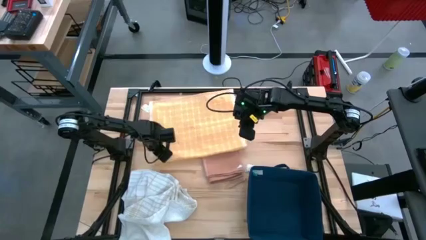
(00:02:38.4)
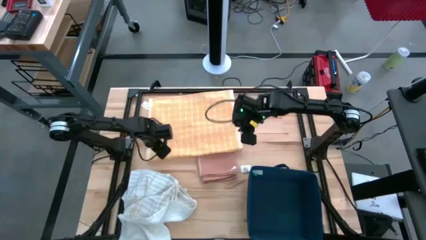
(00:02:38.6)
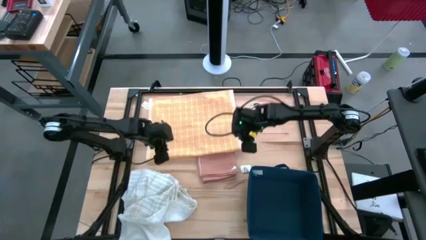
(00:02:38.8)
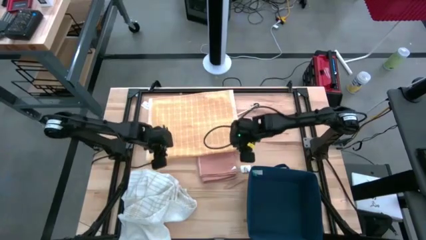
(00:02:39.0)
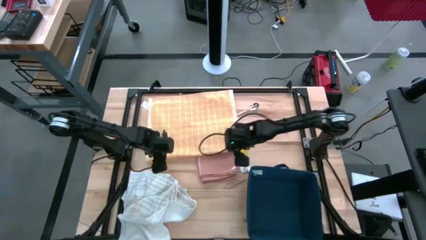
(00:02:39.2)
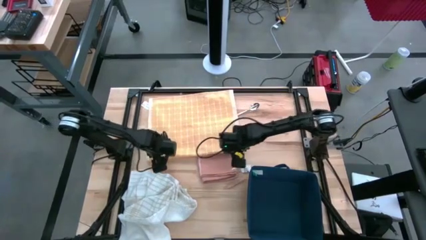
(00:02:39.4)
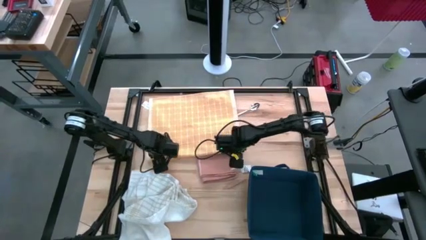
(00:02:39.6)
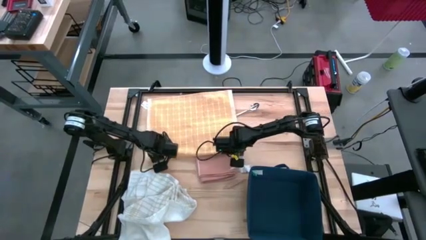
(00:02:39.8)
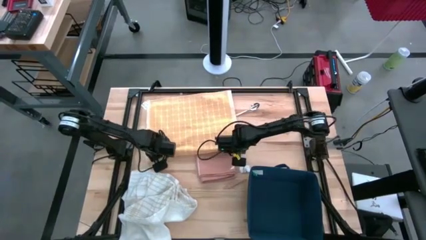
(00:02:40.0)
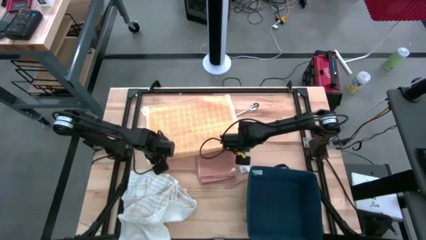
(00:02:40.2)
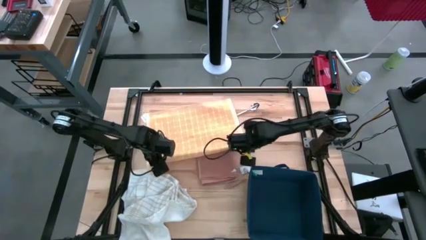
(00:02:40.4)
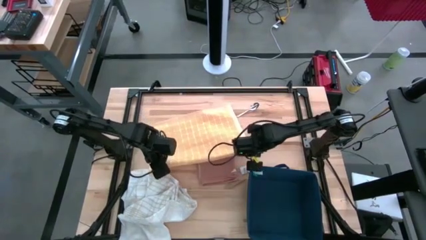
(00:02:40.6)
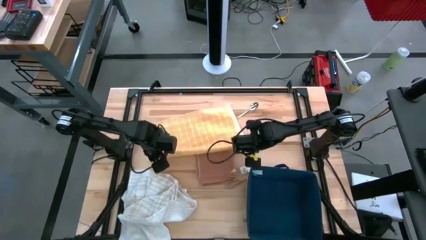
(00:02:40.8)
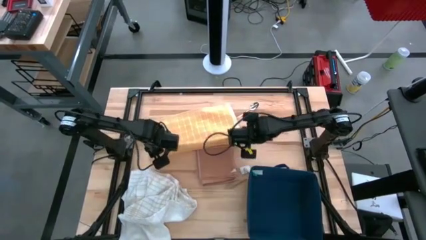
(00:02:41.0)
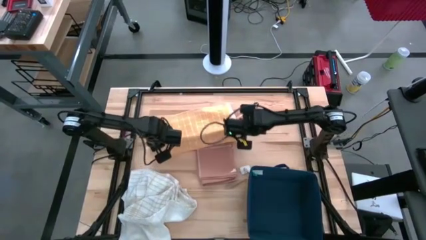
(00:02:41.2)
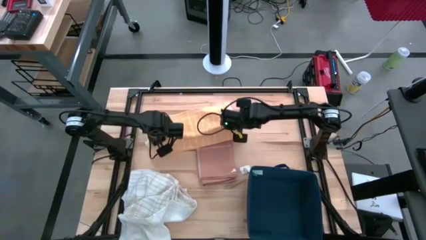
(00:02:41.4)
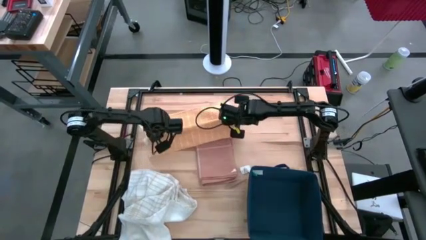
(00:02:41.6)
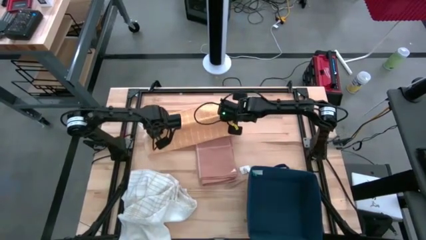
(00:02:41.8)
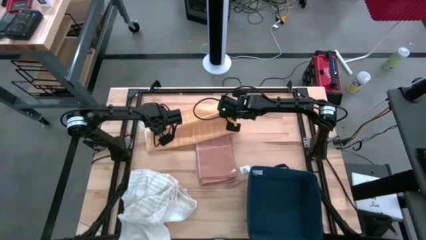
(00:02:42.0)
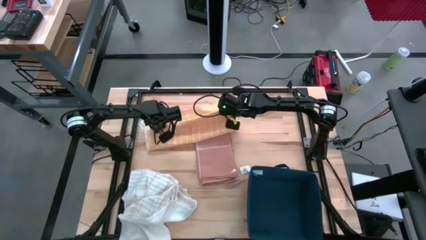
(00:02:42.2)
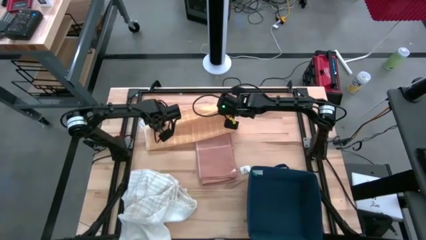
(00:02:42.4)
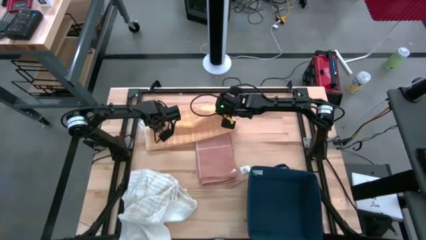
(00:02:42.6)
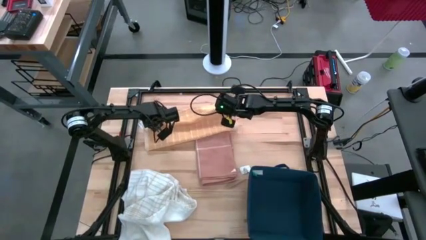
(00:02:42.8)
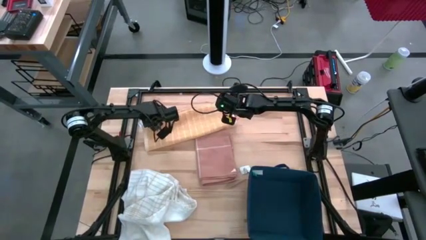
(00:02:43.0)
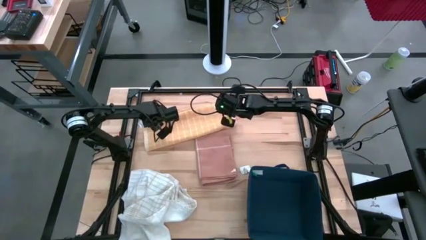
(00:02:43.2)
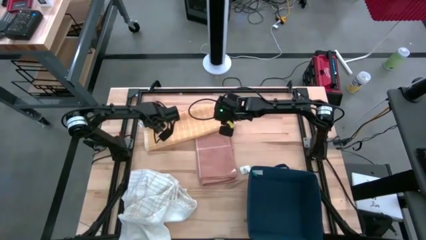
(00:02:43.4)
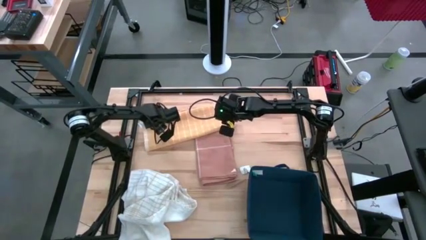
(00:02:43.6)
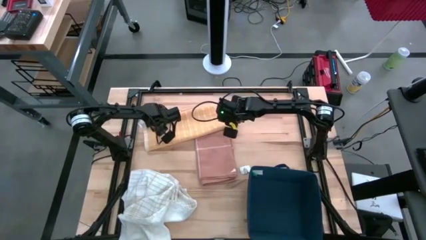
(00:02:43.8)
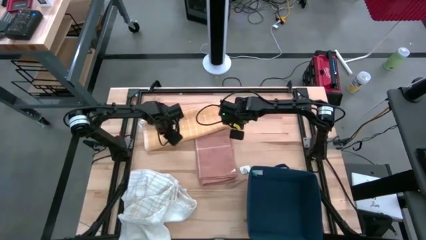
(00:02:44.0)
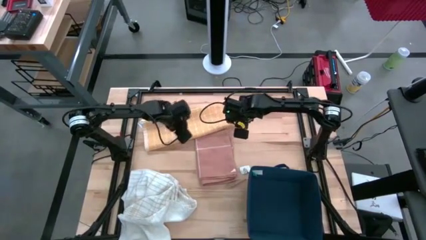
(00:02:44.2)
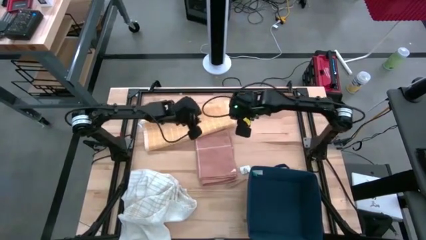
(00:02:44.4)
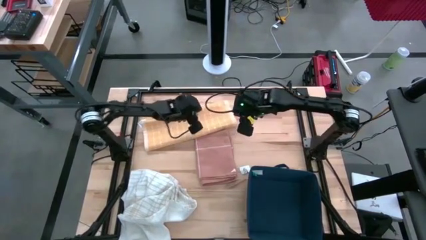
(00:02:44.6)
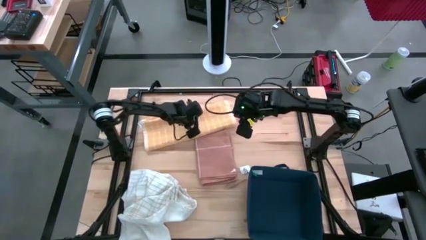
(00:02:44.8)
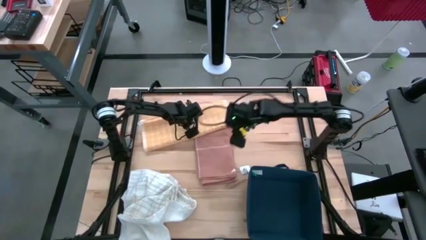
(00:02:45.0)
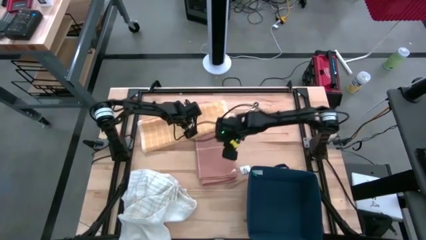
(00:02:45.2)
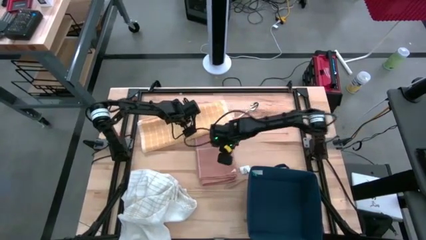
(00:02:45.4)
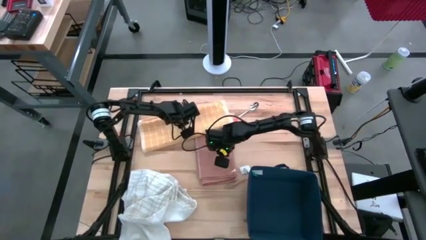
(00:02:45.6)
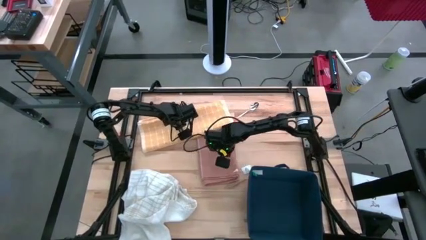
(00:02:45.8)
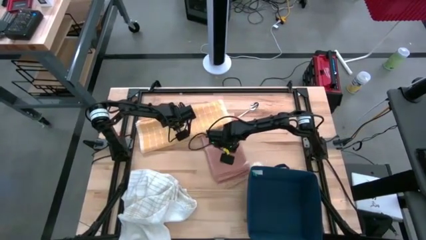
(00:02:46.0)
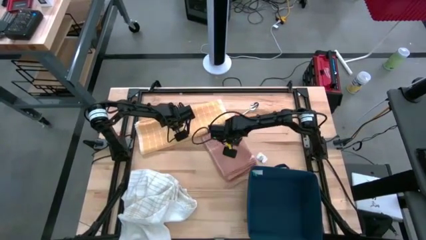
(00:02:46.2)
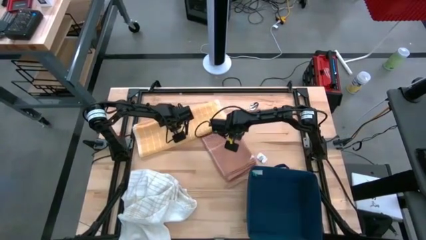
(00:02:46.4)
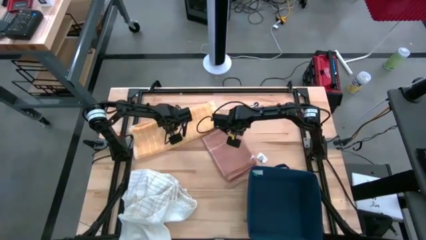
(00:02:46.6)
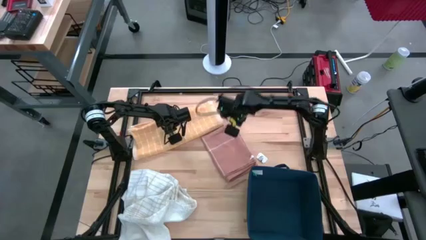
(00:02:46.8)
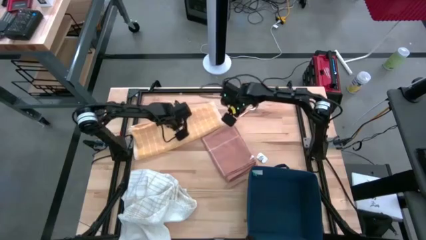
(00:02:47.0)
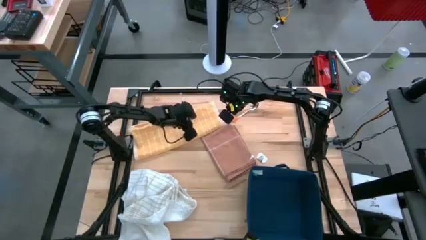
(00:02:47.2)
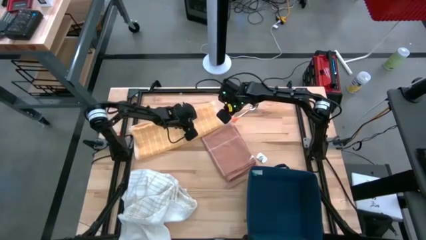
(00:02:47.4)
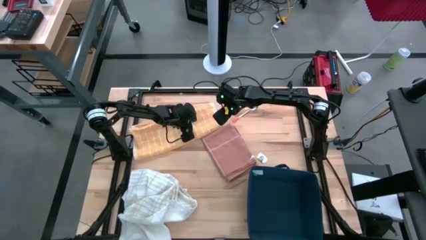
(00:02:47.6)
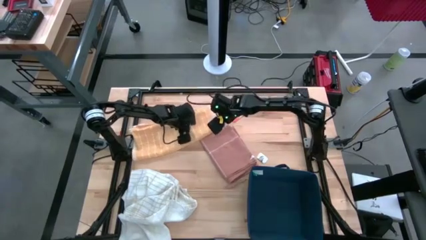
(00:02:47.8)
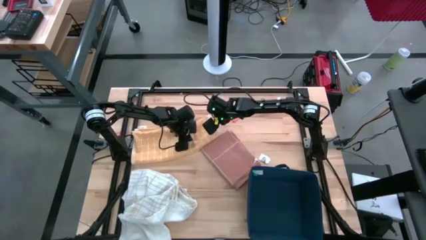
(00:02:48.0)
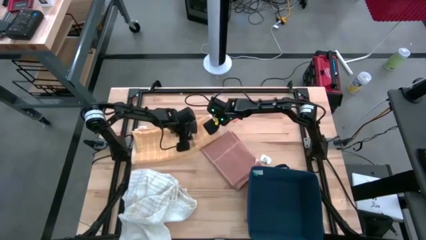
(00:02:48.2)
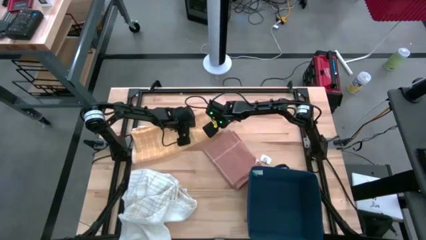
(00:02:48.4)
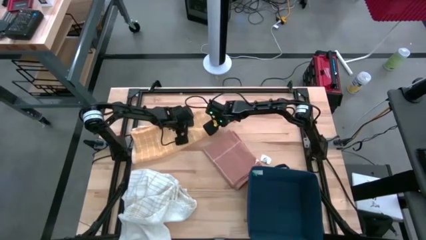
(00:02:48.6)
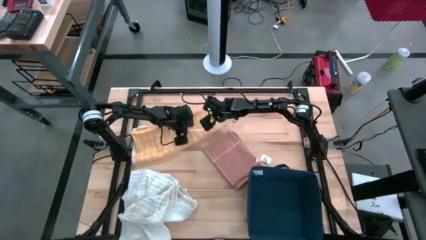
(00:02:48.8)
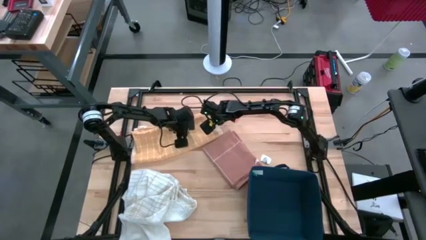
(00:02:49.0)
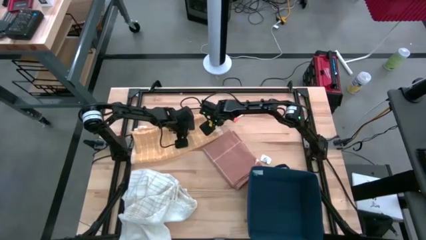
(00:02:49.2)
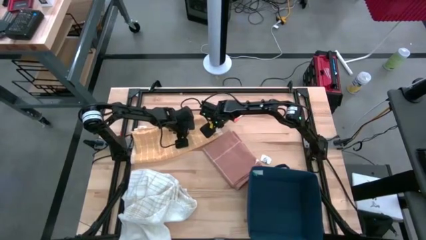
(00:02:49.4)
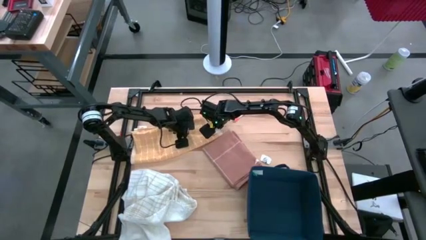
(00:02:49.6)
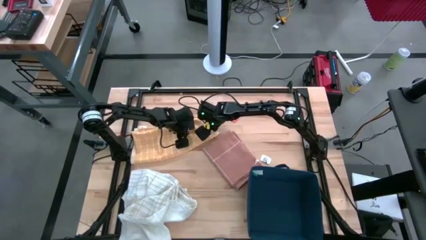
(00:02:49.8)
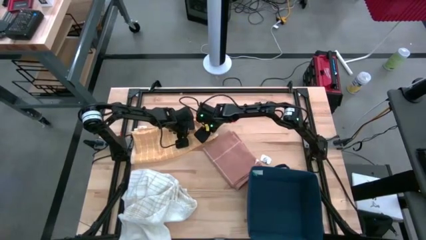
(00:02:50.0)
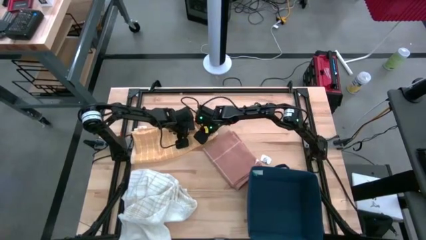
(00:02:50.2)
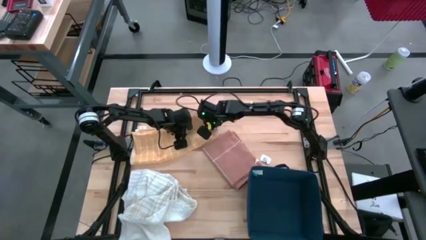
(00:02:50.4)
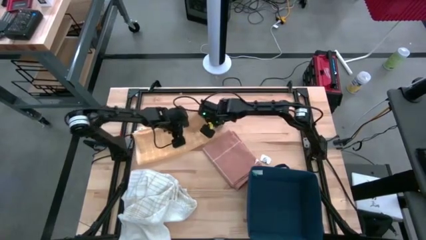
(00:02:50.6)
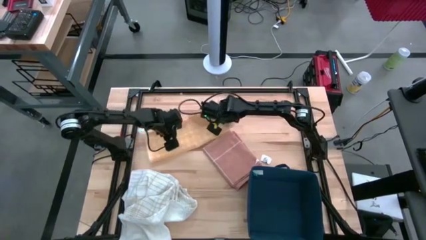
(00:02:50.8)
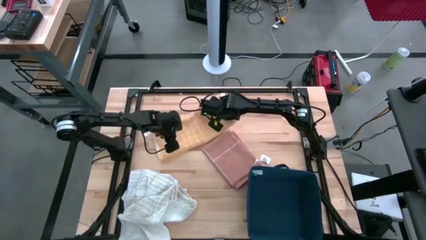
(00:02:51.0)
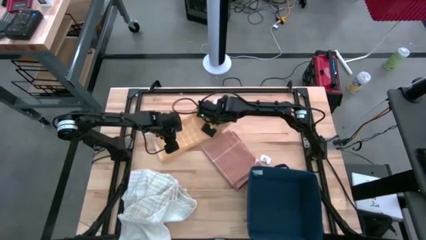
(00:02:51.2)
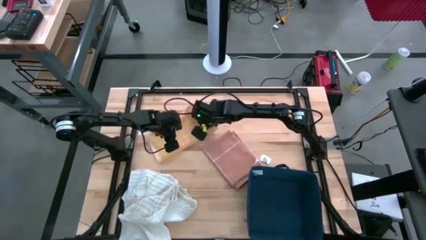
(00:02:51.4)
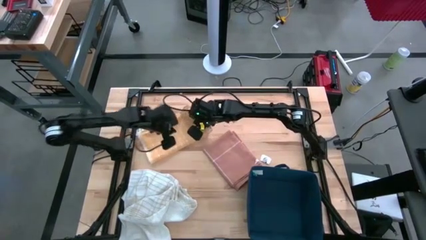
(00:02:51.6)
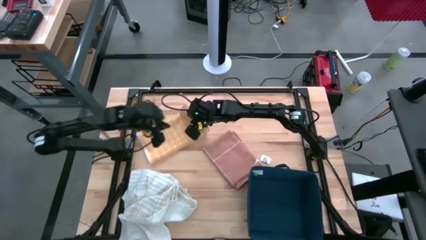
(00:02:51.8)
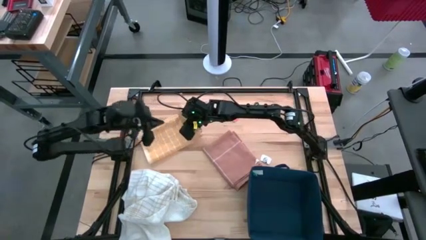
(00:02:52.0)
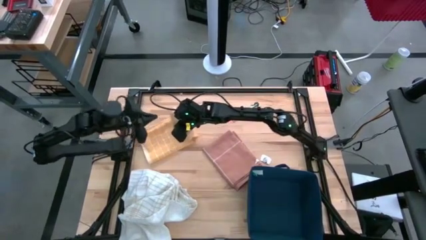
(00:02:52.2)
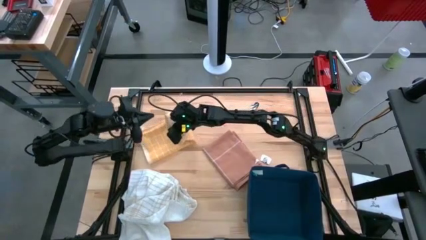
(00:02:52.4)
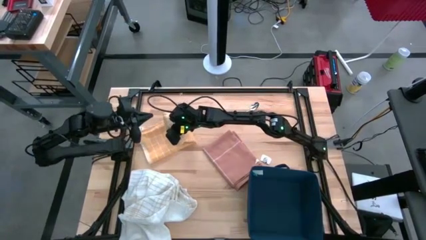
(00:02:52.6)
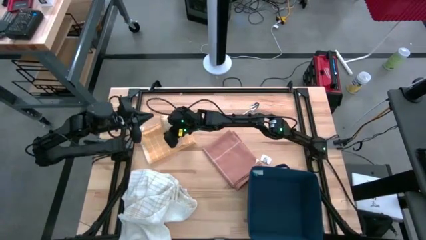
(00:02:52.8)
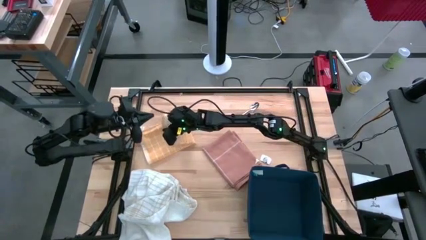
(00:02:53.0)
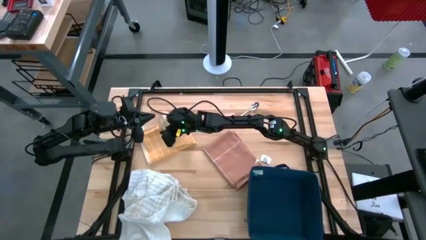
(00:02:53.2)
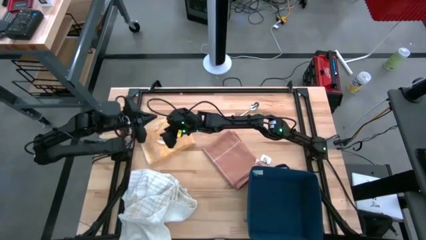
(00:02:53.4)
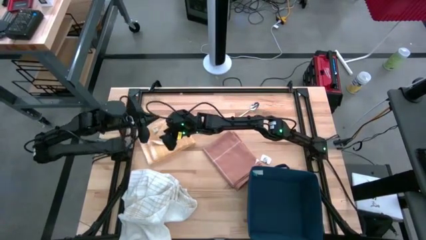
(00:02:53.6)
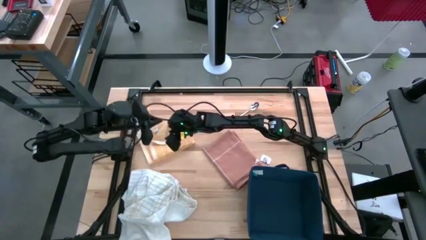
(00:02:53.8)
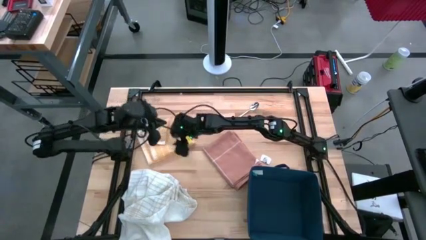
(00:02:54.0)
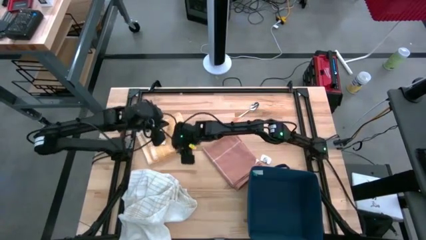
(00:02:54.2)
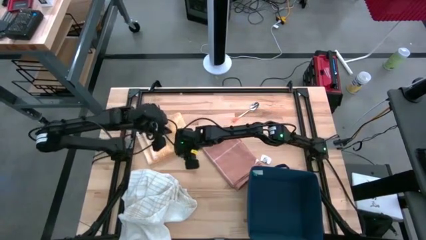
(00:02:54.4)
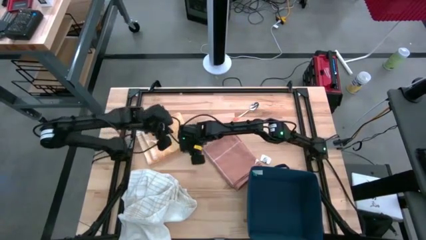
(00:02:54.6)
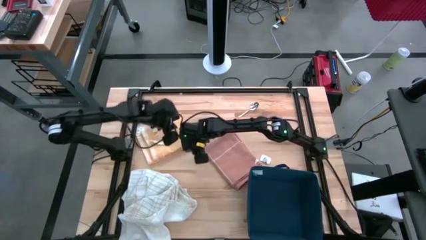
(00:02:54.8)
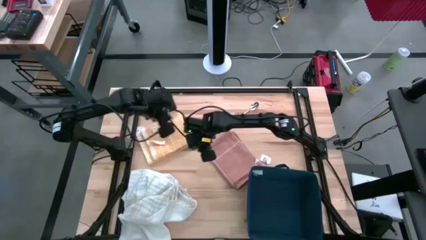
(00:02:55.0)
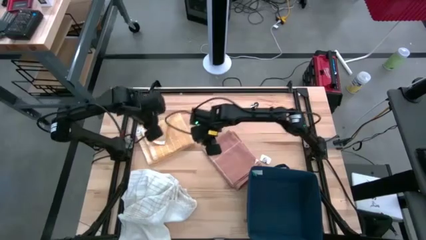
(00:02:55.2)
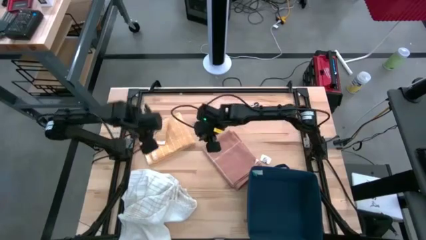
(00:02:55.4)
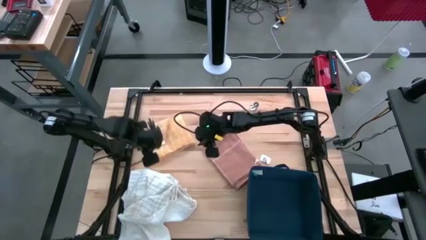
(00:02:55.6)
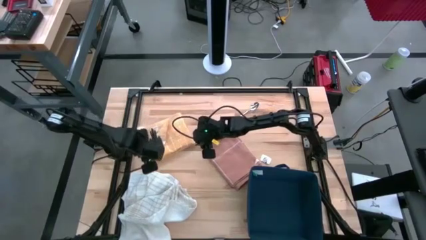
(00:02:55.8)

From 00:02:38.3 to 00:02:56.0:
Task: Fold towel
Fold the yellow towel
